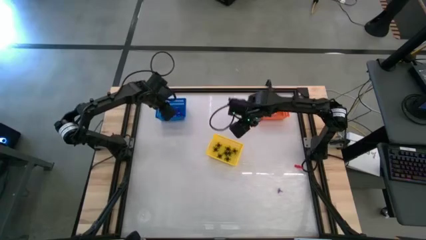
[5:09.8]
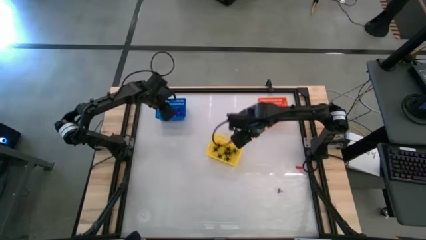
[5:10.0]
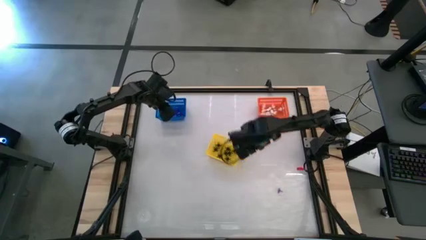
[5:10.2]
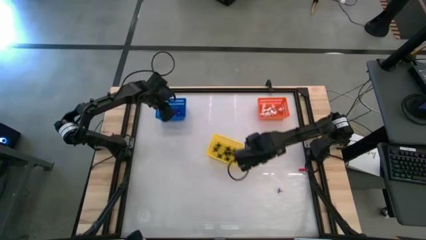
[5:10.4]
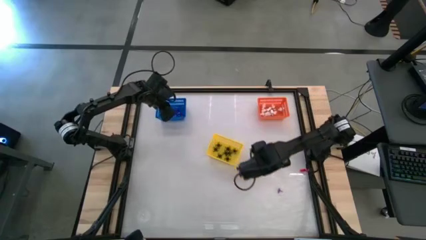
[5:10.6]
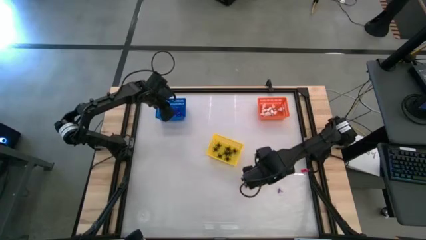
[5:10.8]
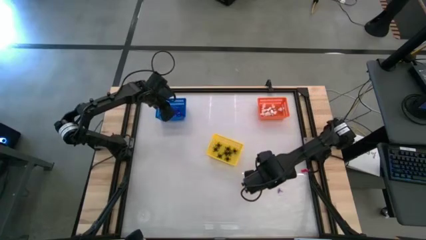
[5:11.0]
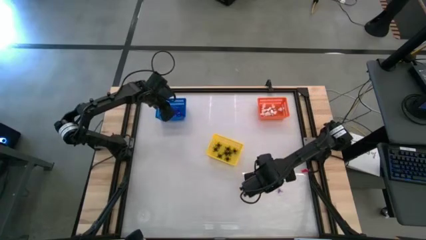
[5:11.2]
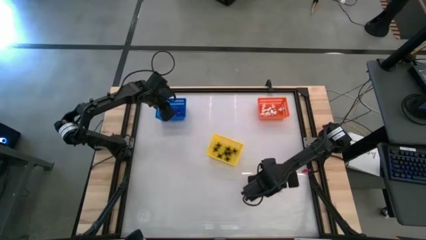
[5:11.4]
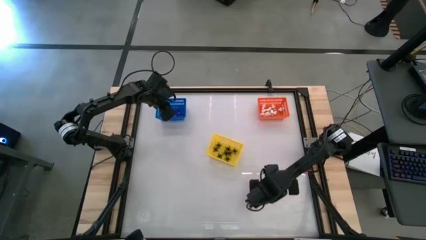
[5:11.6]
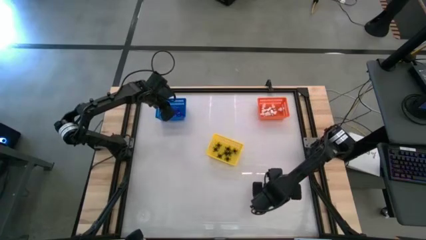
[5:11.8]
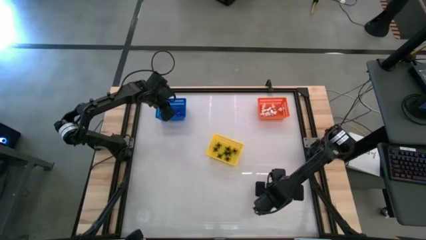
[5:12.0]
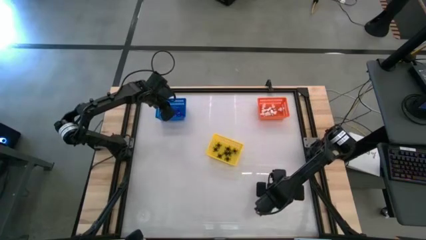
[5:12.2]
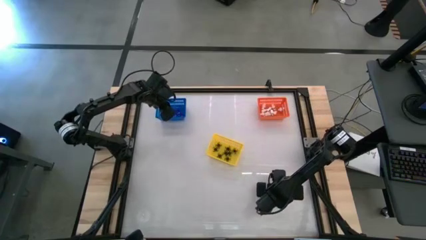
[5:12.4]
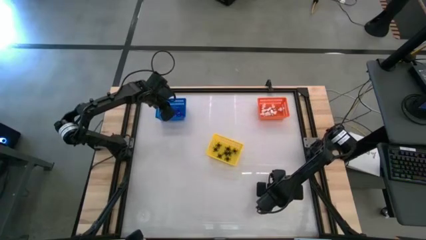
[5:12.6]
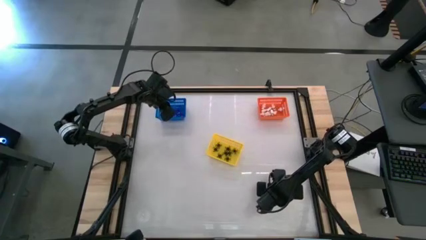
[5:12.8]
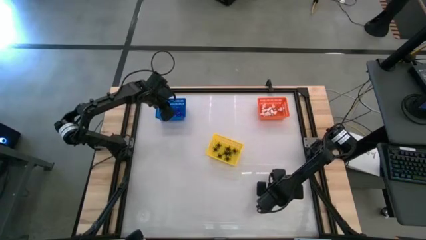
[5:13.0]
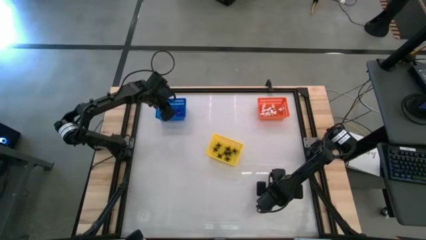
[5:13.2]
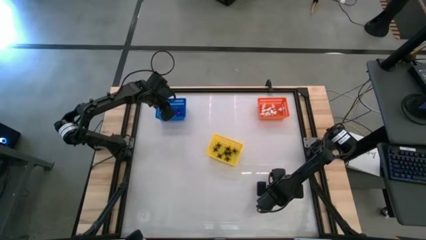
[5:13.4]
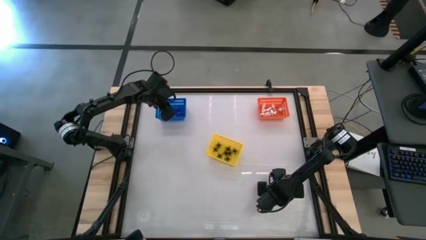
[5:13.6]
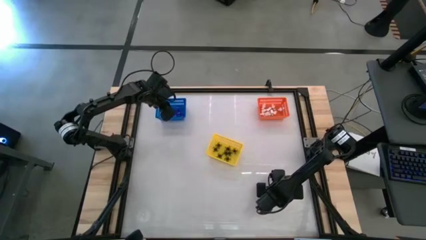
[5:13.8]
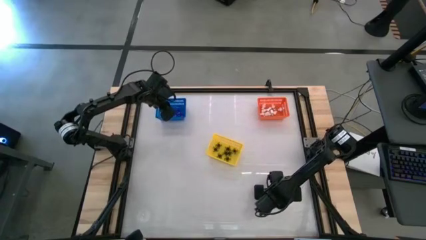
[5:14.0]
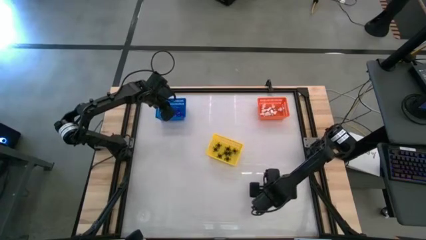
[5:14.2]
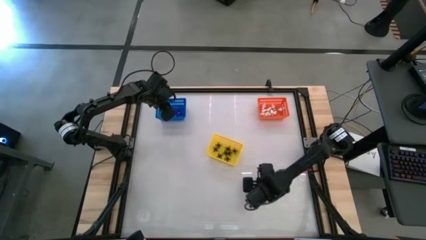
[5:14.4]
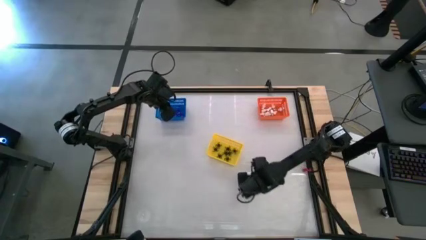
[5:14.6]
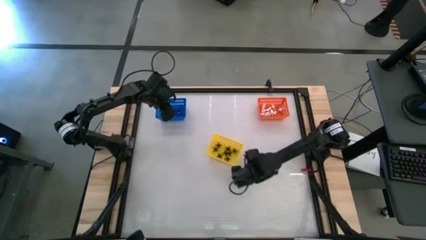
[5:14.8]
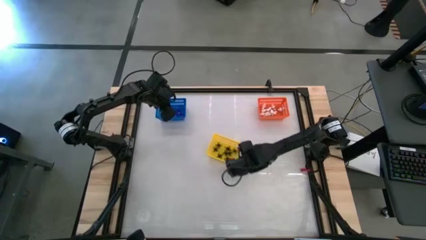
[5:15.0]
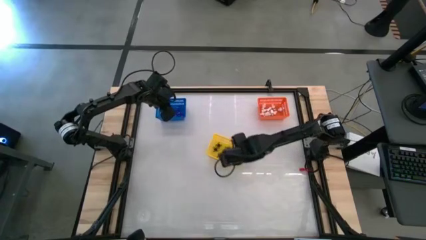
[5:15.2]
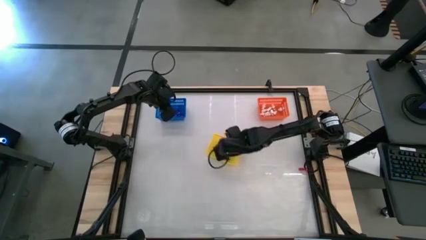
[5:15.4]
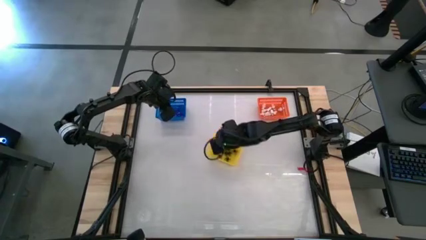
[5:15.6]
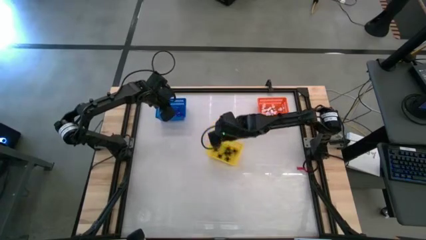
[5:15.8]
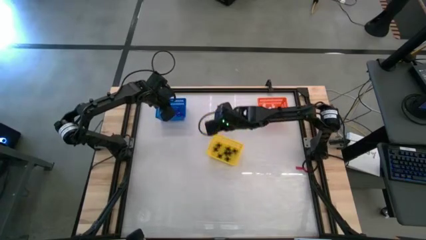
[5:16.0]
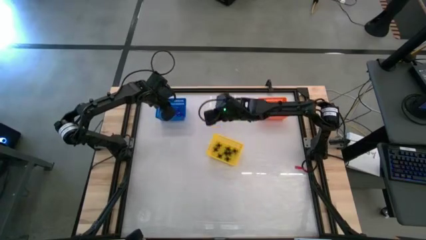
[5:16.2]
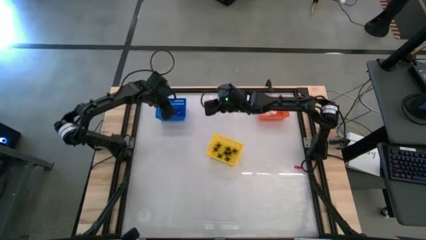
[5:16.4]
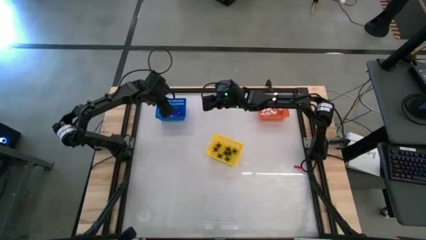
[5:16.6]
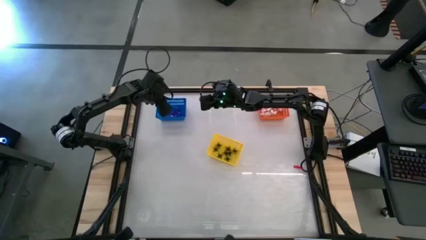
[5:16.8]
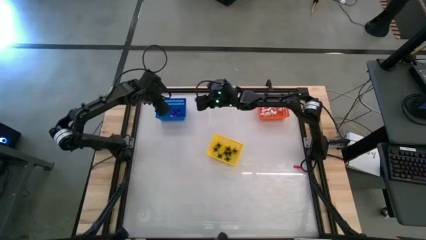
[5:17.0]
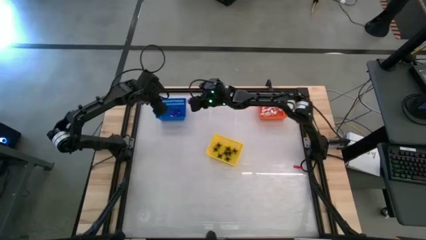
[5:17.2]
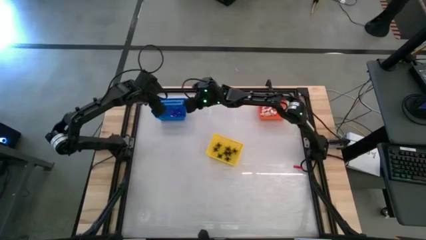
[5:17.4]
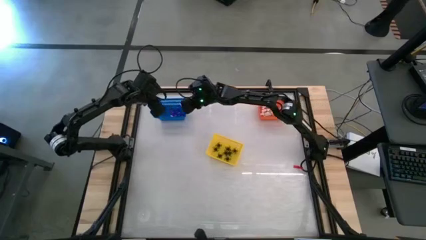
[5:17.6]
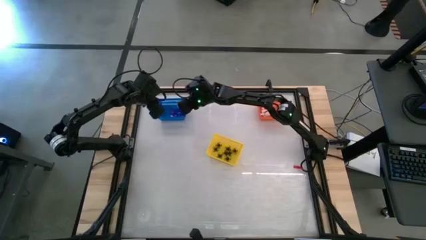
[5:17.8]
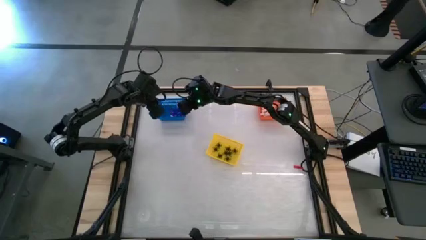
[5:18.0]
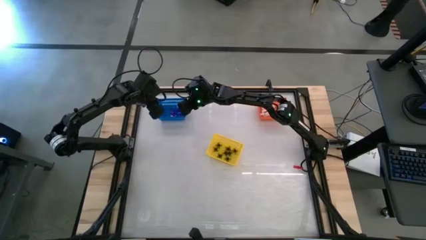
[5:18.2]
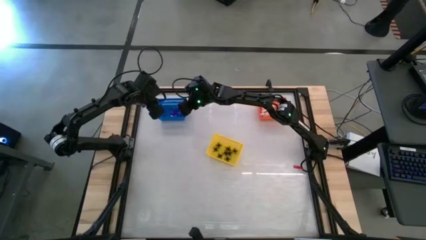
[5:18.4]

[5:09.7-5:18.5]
Task: Sort Halloween decoration
Put the purple witch hat toy into the blue bin

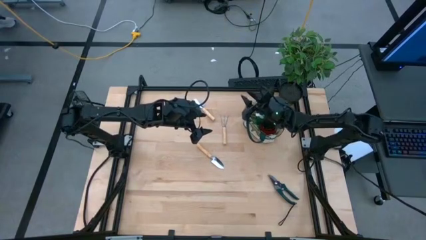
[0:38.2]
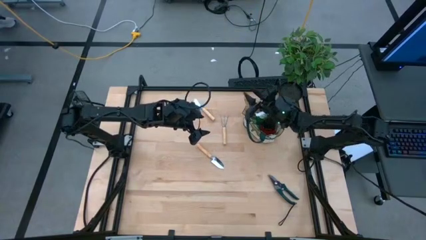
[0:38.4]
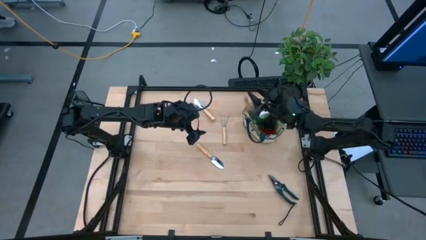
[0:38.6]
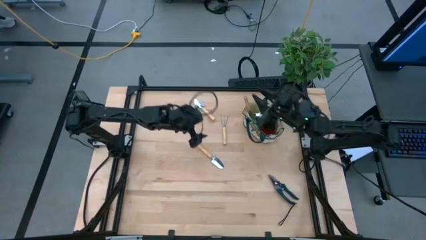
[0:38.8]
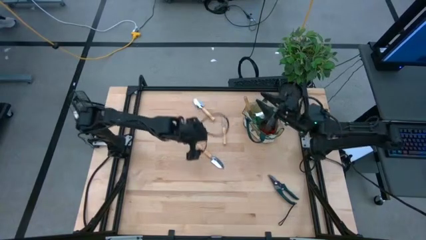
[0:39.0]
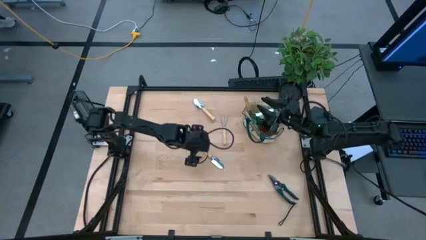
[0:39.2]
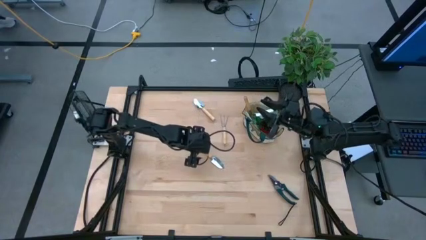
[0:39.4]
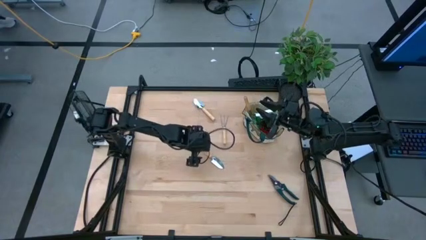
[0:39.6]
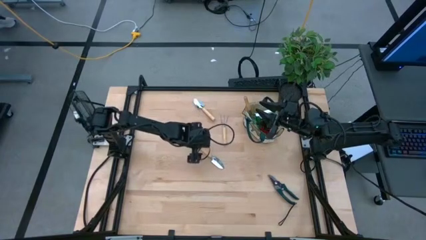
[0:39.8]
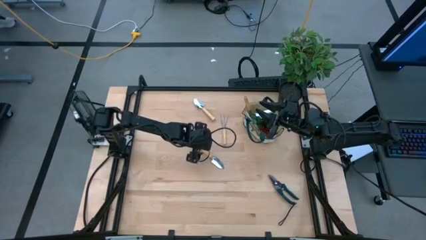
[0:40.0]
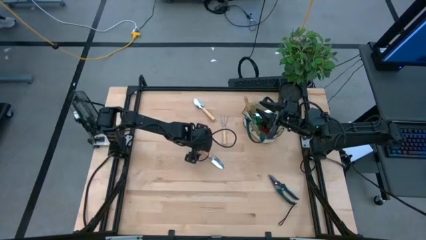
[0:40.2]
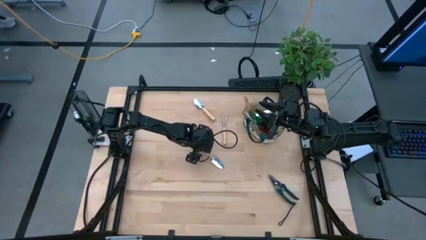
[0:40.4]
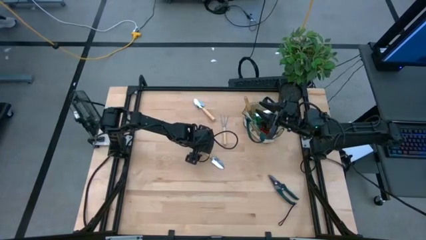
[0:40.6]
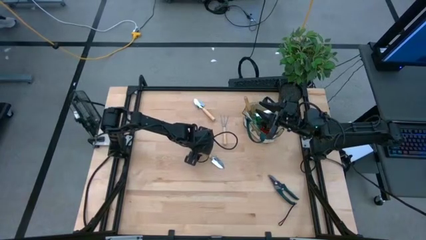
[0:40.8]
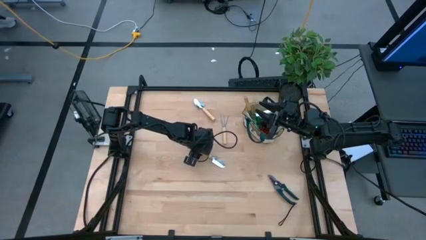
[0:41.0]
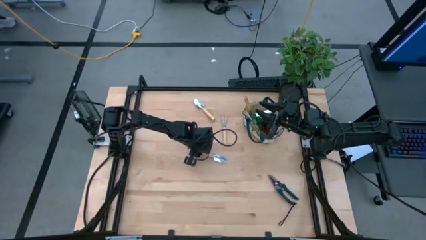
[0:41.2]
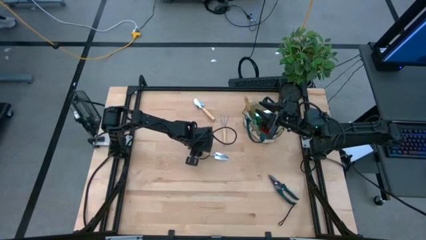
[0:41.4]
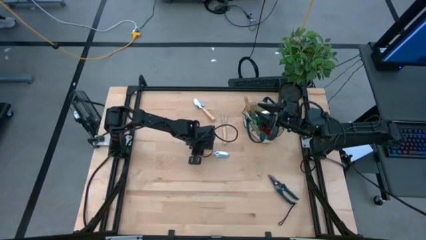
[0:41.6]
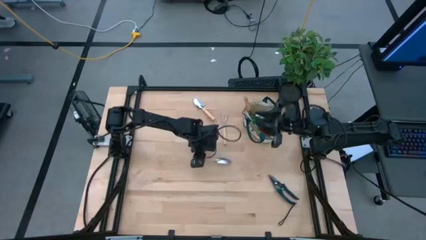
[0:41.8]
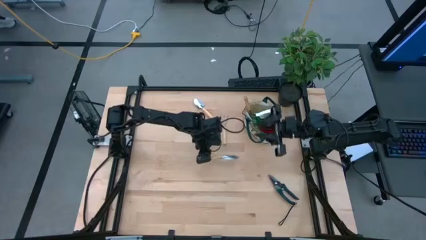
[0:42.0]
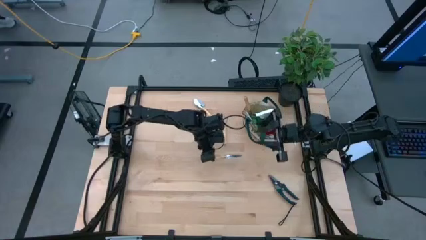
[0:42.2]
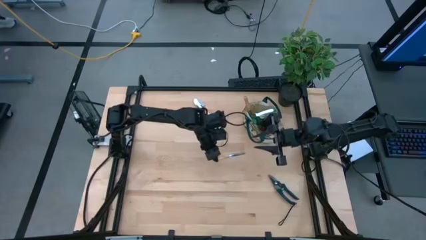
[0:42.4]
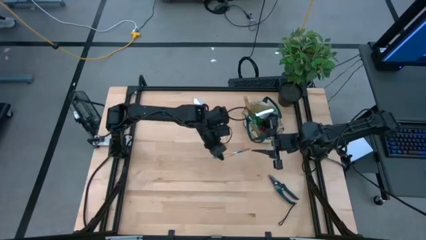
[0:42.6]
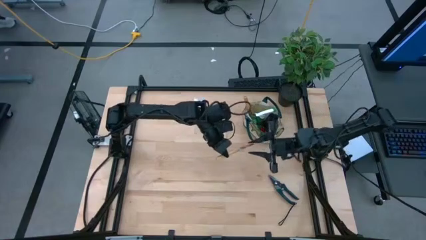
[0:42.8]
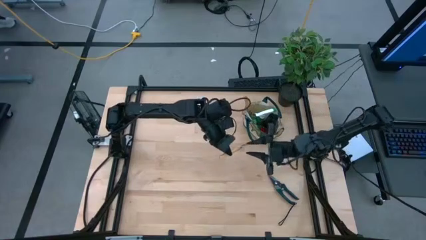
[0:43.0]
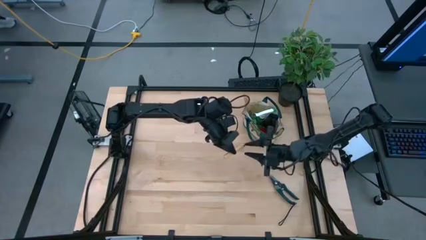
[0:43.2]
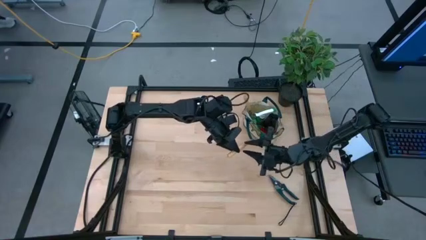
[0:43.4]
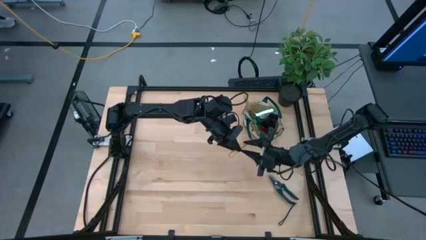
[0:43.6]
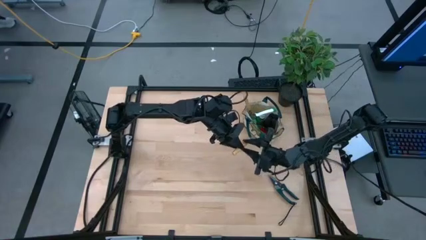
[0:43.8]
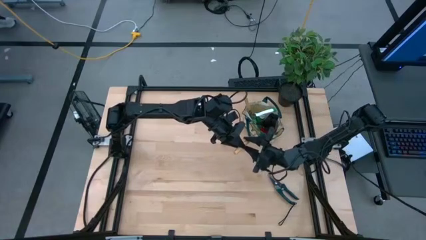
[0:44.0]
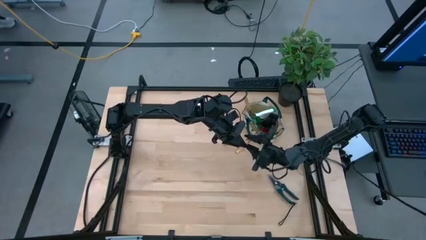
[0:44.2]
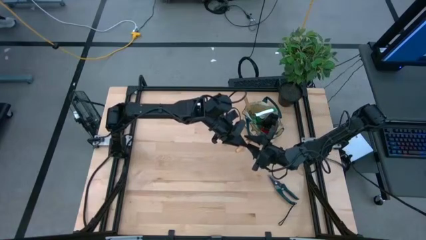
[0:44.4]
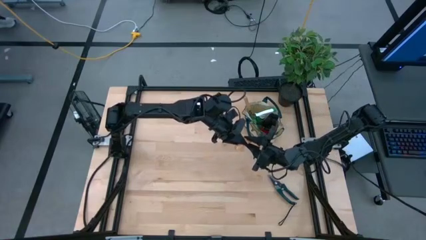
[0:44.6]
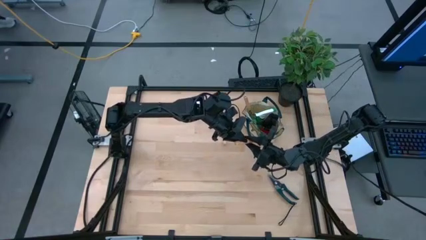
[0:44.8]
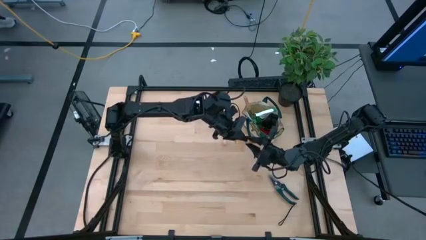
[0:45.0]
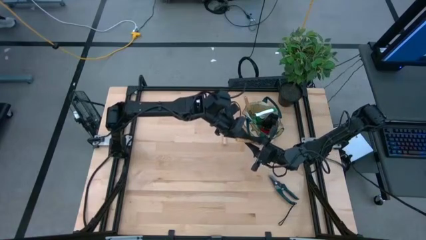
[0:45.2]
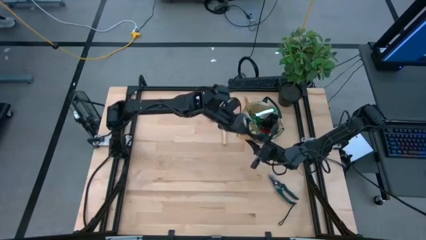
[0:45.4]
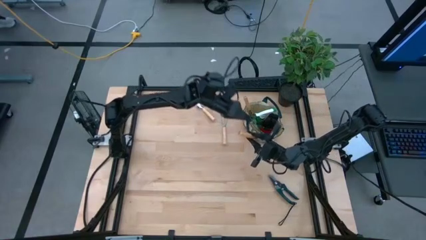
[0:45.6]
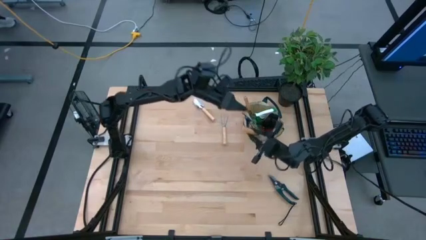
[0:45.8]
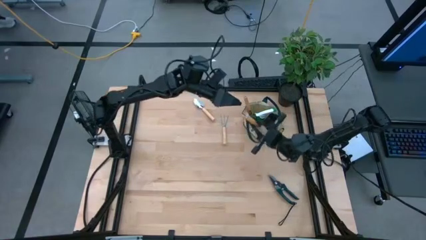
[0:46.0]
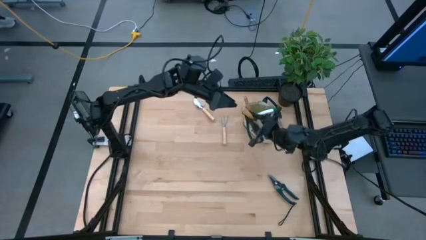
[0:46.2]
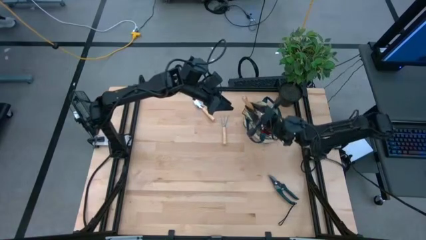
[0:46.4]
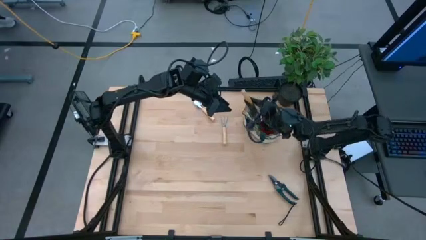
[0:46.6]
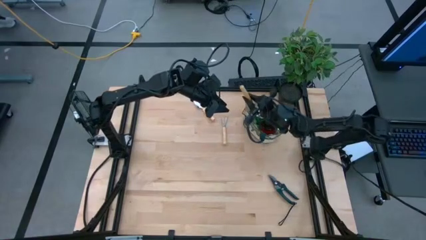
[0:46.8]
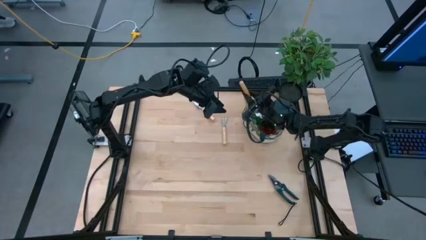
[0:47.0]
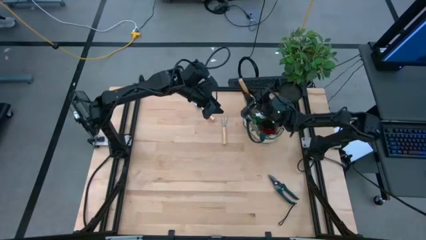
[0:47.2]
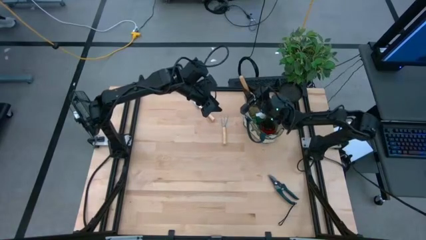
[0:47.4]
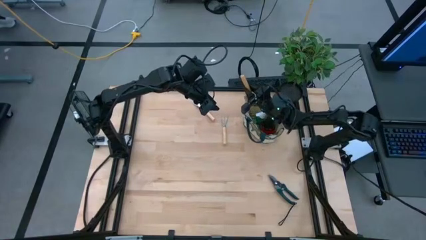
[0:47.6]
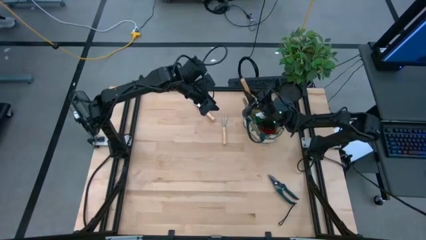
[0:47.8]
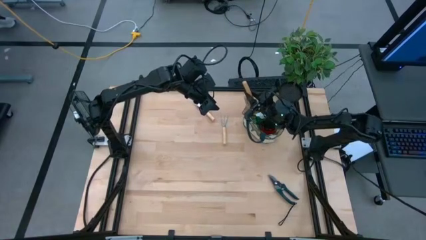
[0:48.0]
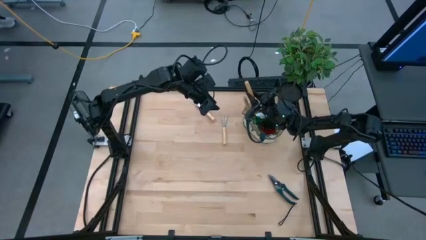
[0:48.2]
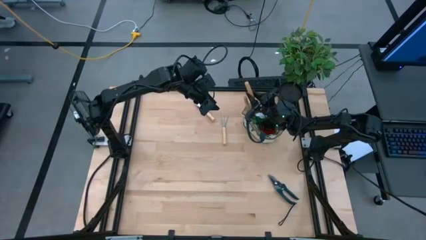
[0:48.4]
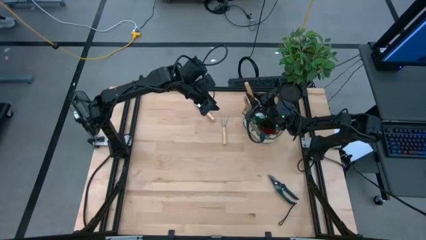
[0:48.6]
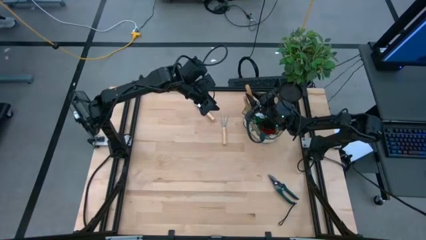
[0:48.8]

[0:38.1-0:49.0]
Task: Pick & Place Garden tools in Gardening bag
Put the bottom brown trowel into the gardening bag
